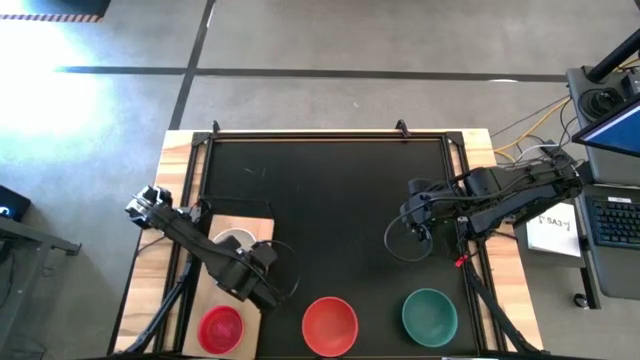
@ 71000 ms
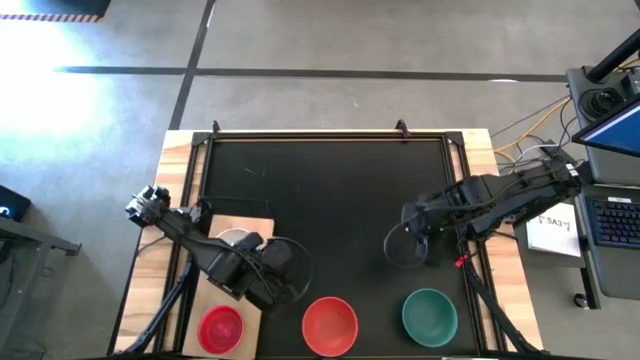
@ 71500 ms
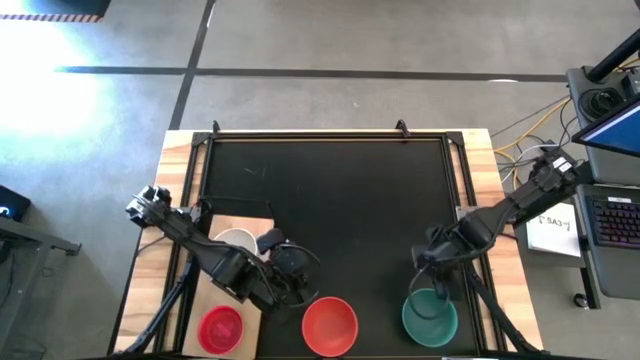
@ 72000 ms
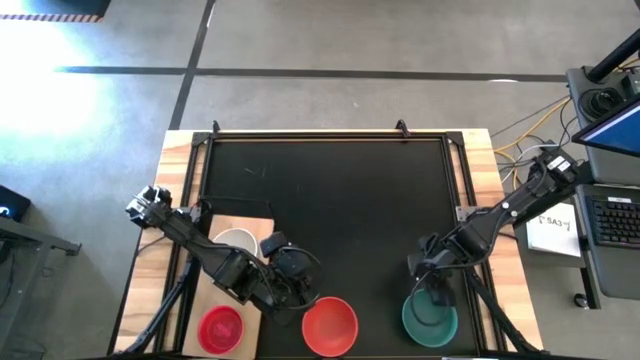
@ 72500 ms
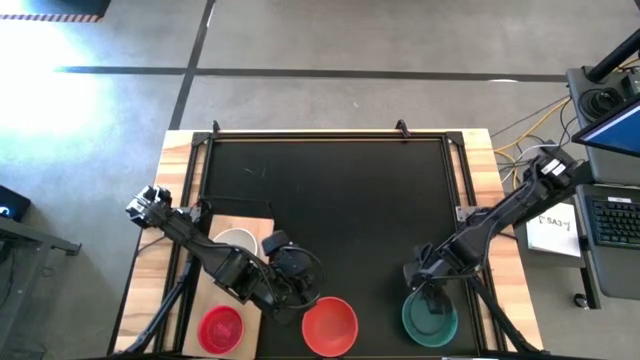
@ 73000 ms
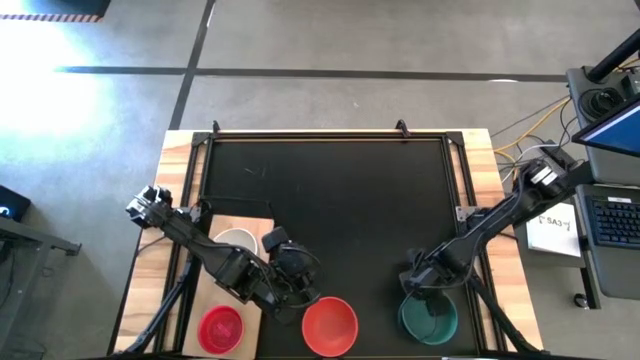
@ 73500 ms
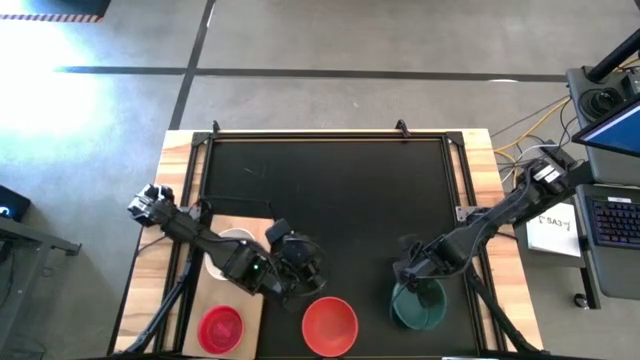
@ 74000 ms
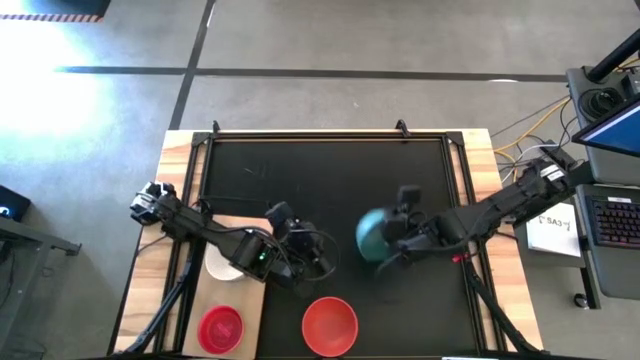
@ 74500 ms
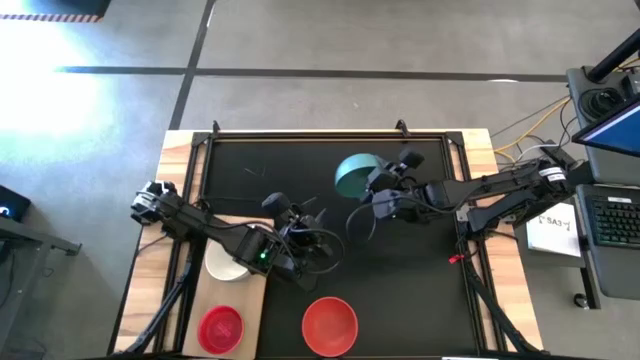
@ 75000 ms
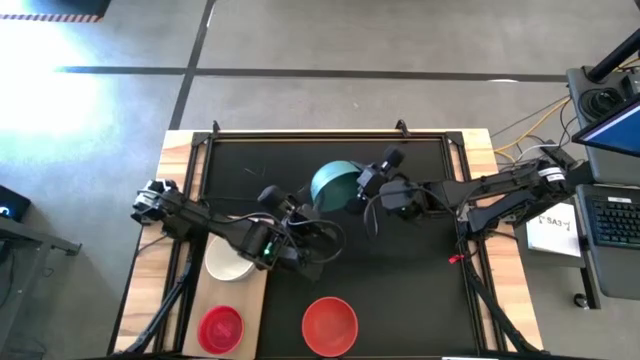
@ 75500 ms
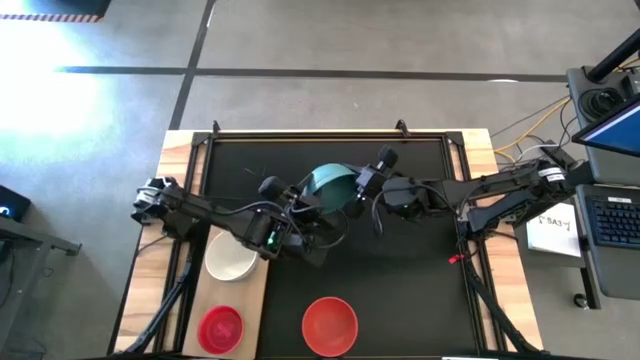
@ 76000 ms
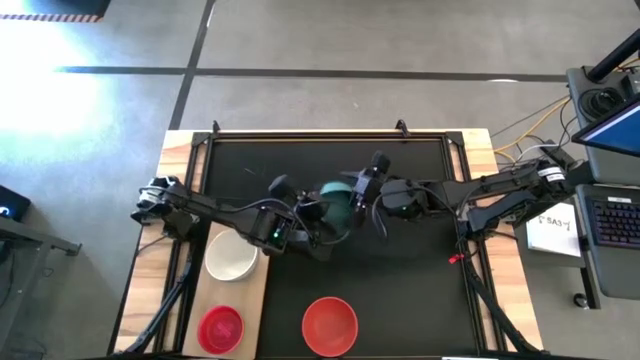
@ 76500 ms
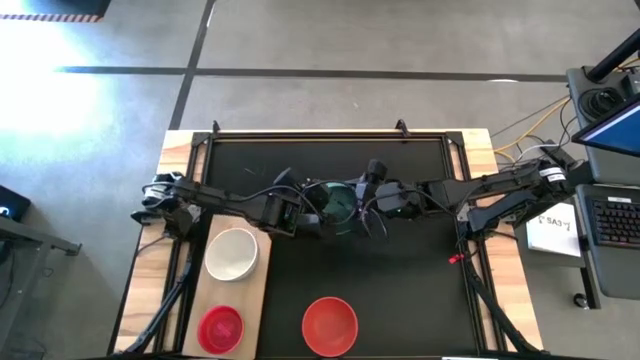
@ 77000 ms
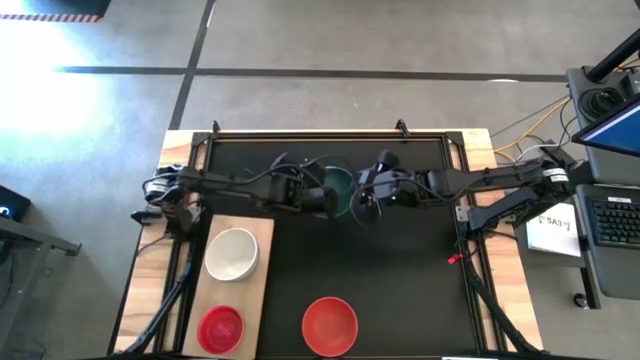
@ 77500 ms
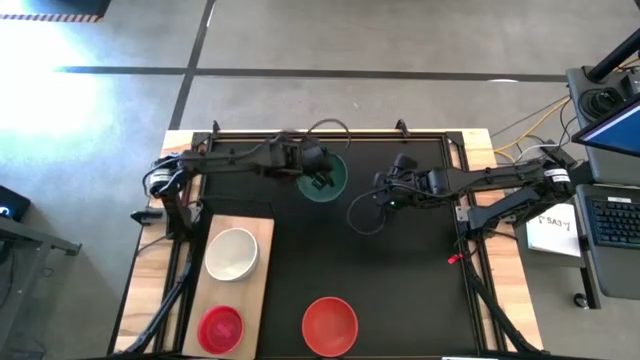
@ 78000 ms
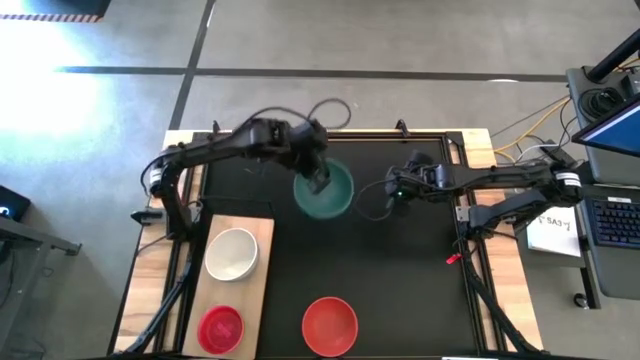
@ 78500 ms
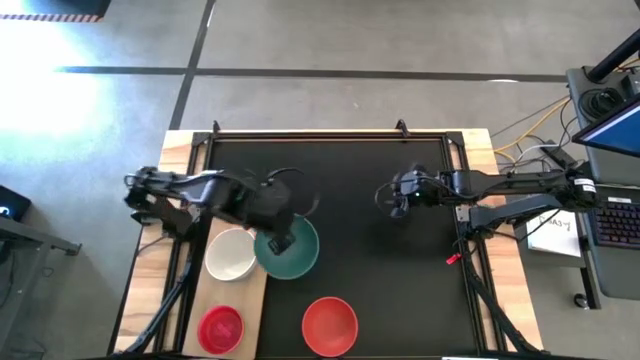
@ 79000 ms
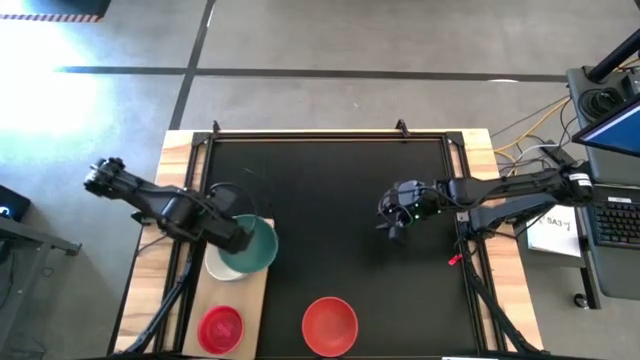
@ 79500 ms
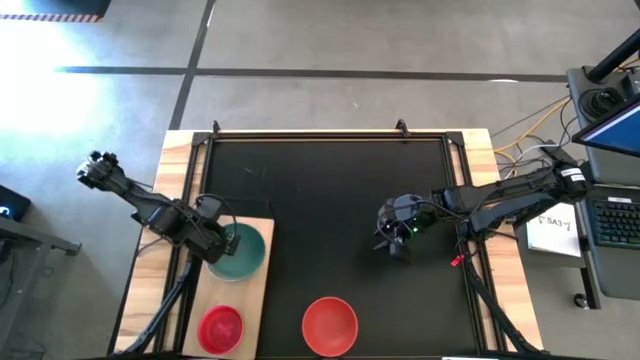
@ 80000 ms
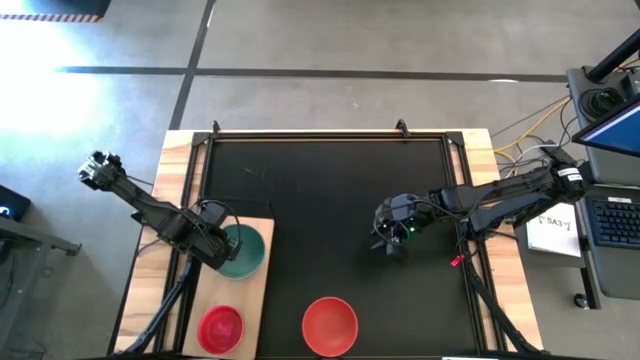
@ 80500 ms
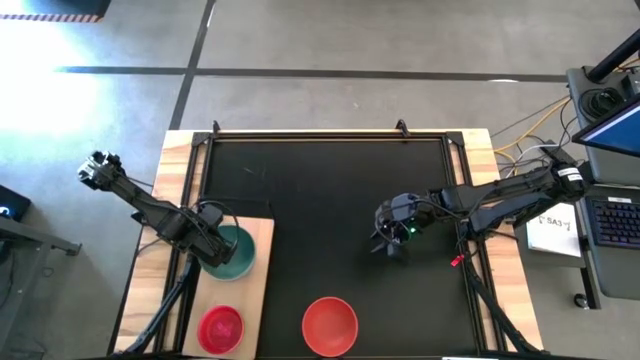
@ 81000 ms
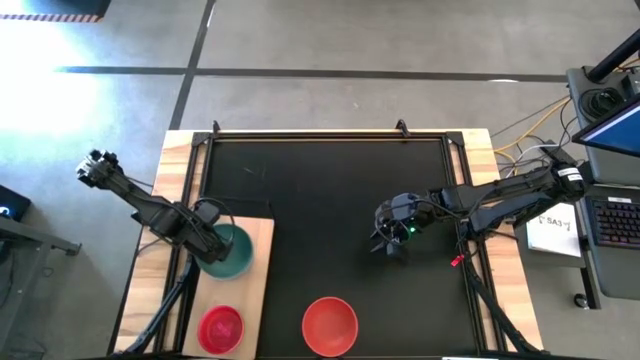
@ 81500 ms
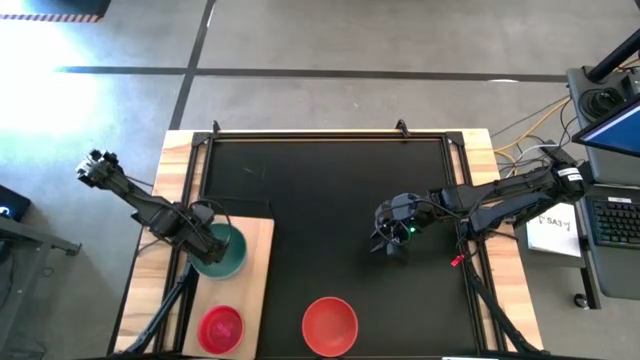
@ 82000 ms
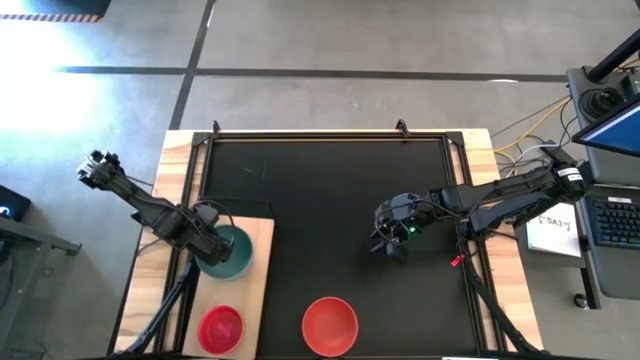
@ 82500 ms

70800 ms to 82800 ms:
Task: Place and stack bowls onto a shelf
Stack the green bowl on the white bowl on the shelf

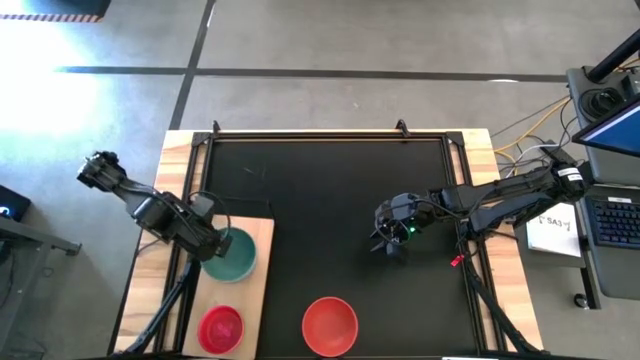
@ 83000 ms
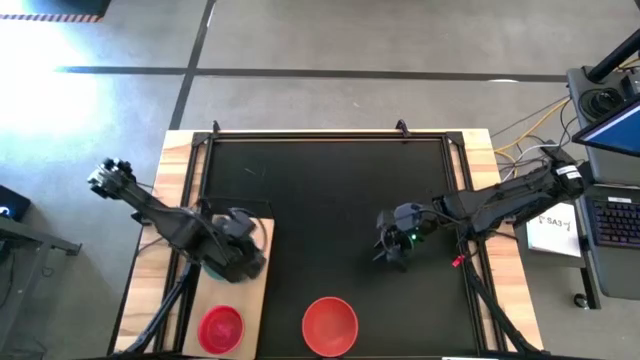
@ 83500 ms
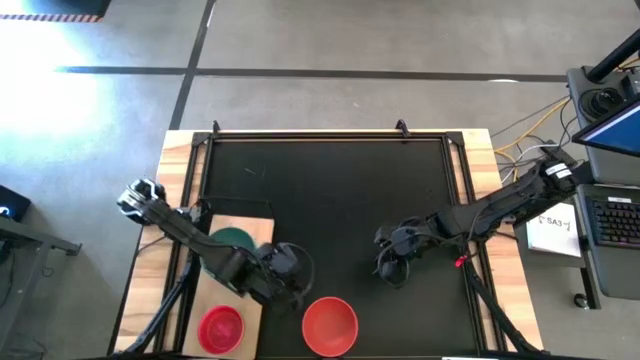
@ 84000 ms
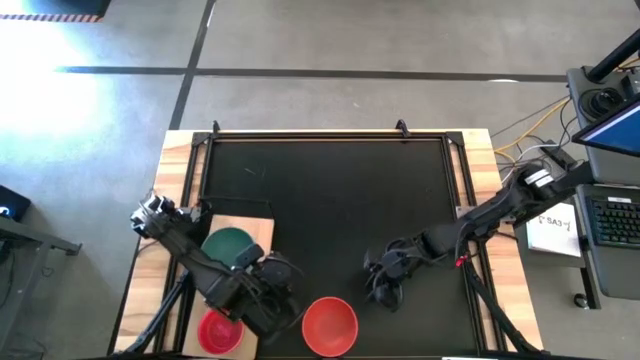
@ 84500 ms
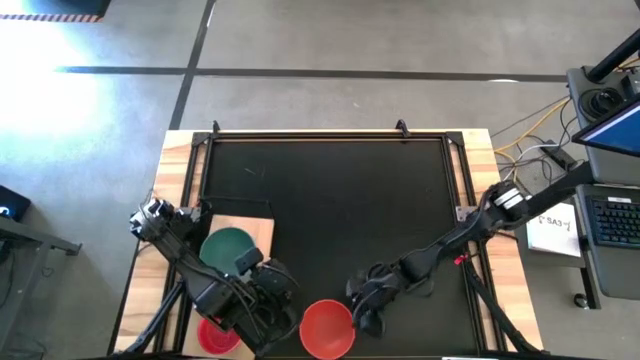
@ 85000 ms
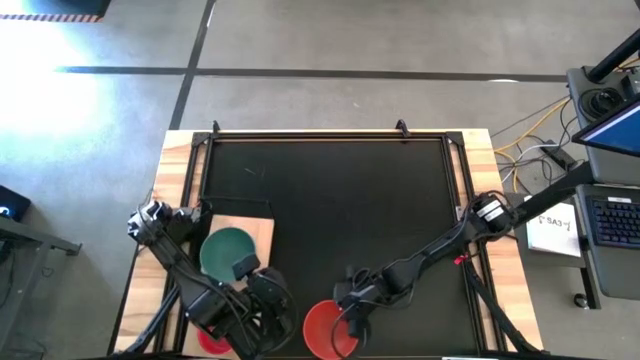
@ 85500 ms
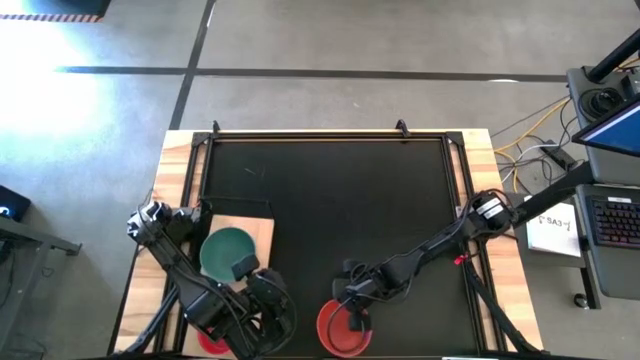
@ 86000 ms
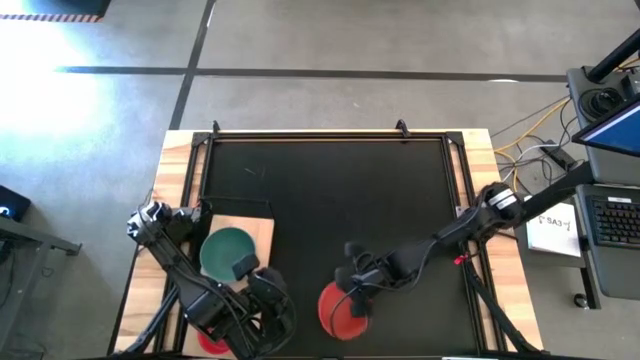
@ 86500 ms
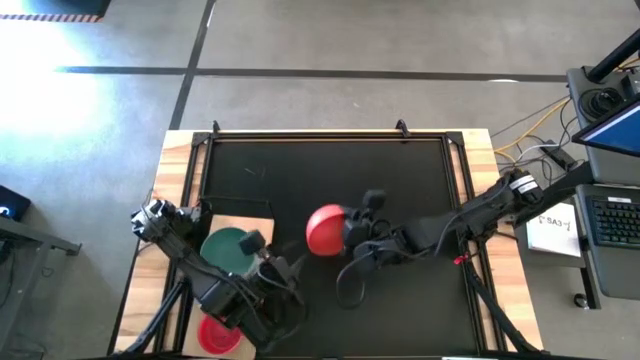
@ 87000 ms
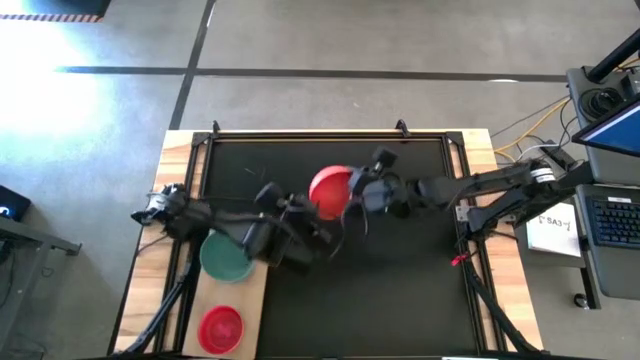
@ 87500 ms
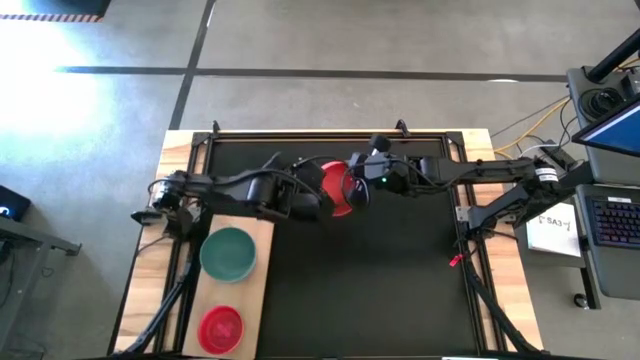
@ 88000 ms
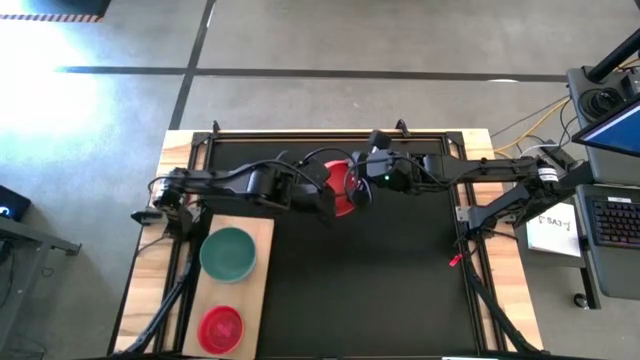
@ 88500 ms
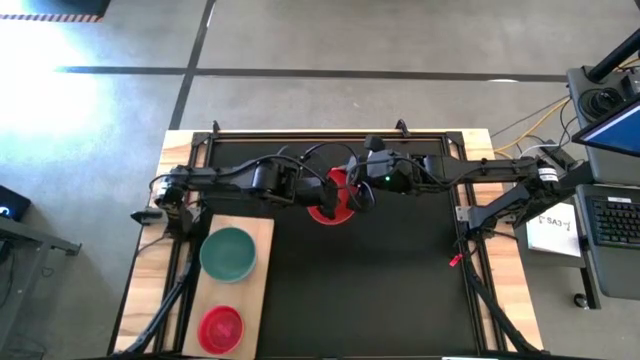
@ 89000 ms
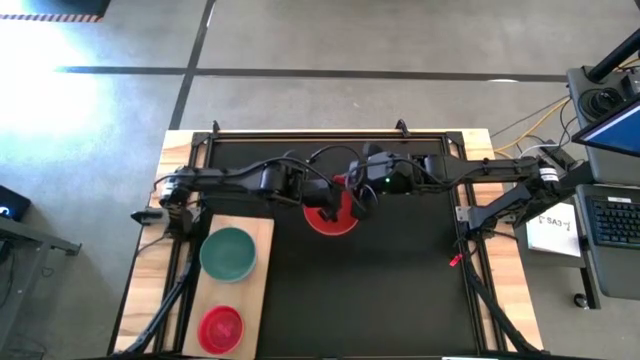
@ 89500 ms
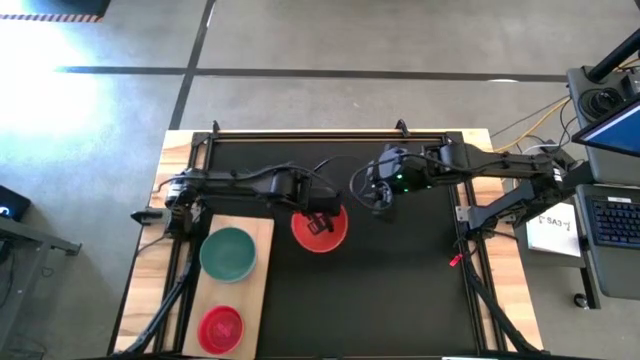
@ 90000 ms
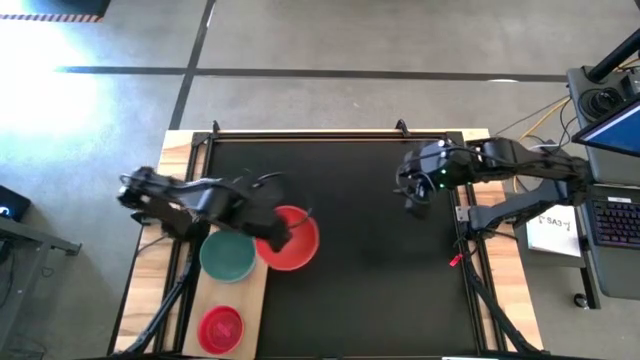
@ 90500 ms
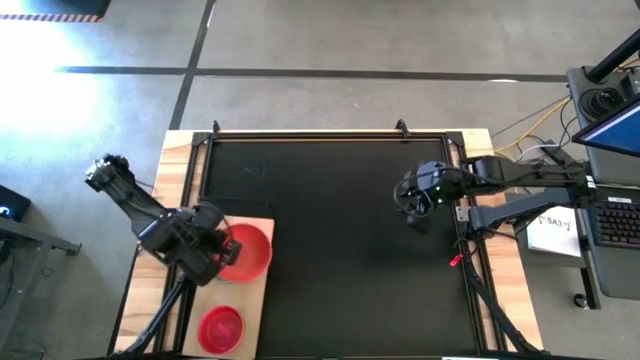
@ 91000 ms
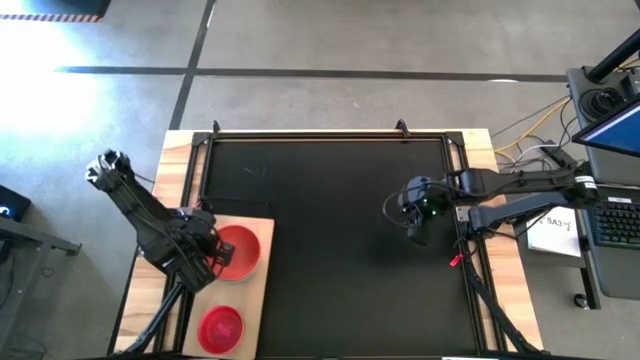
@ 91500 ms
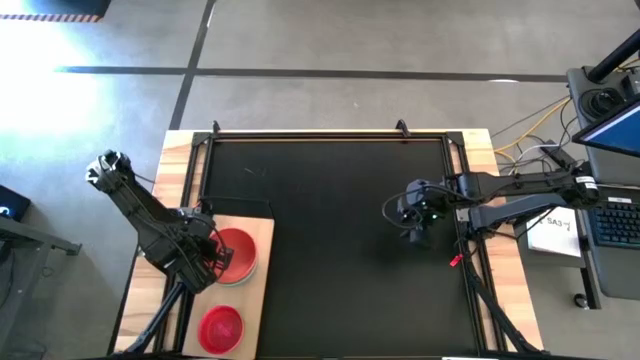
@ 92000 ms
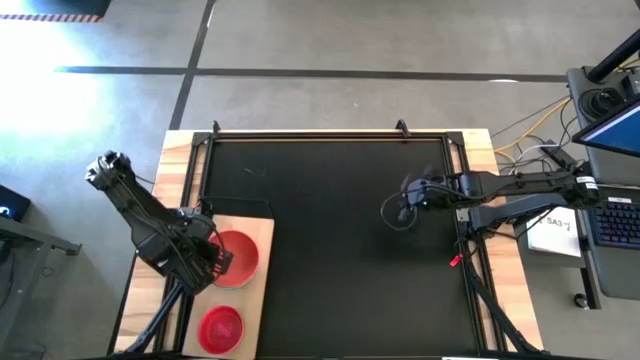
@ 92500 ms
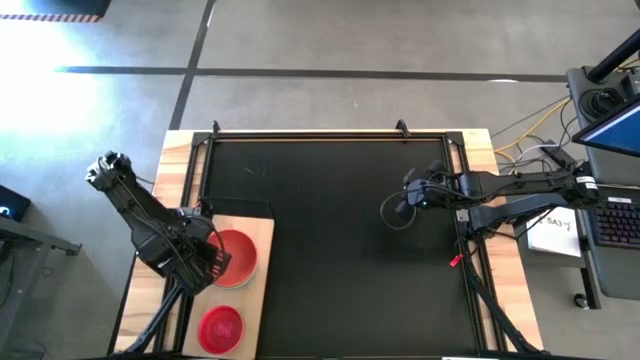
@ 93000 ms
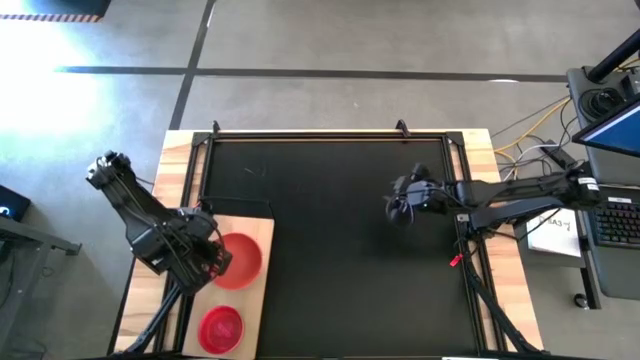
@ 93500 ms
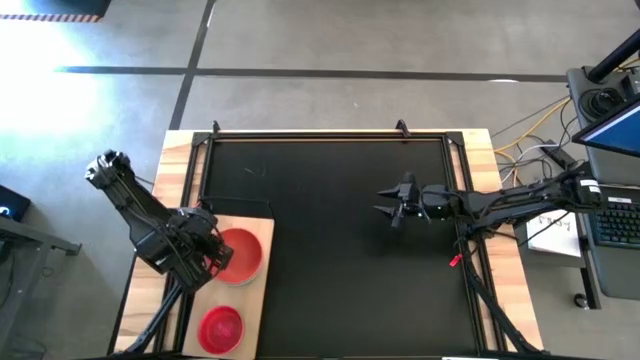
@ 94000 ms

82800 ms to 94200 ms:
Stack the orange bowl on the green bowl on the shelf
